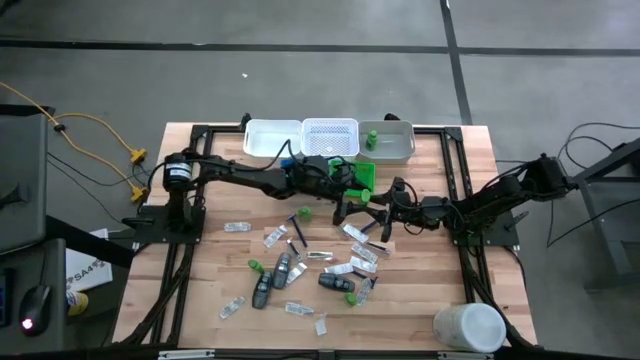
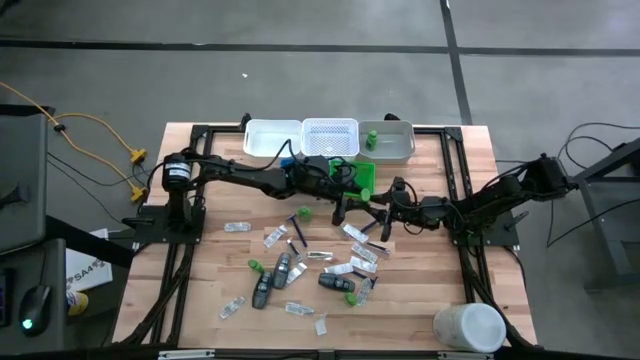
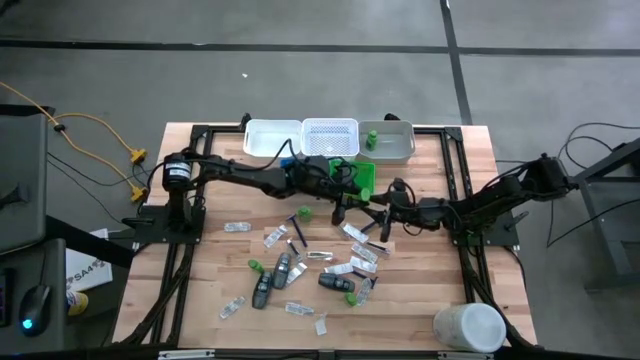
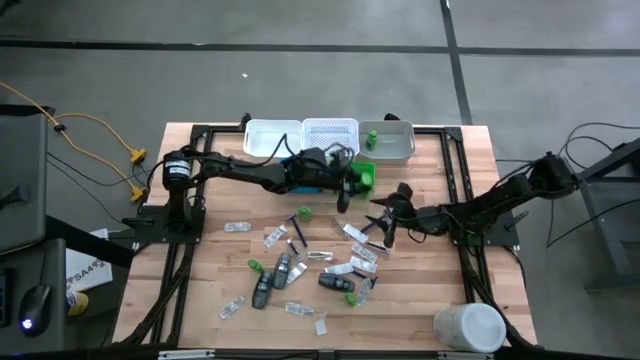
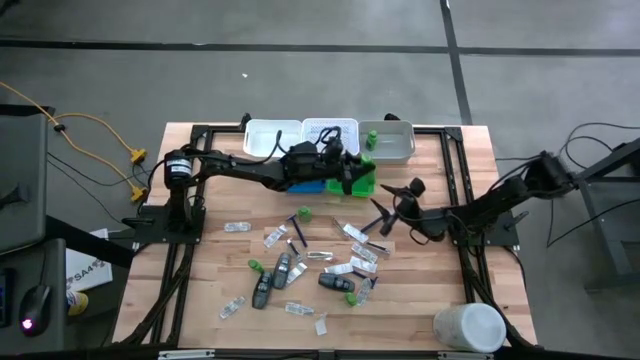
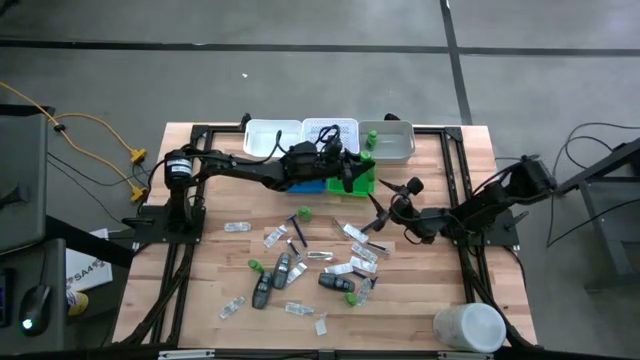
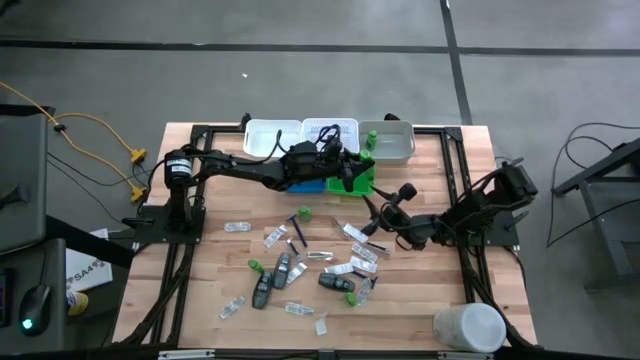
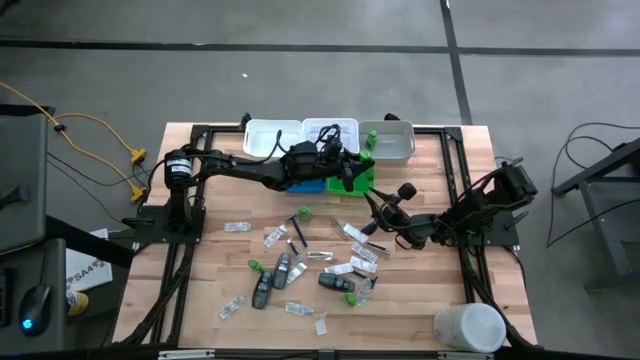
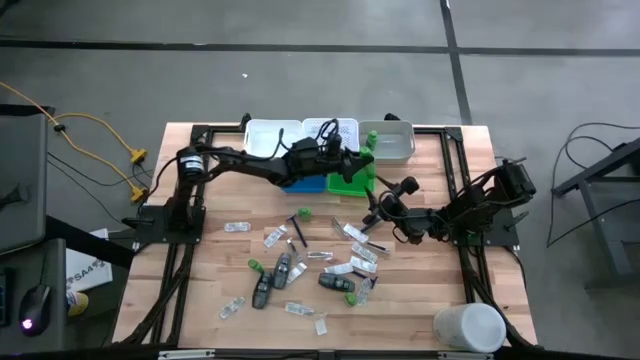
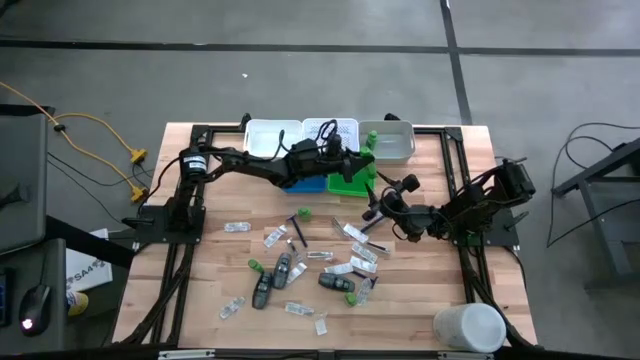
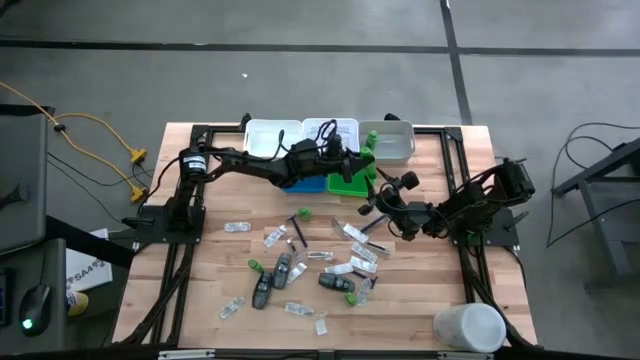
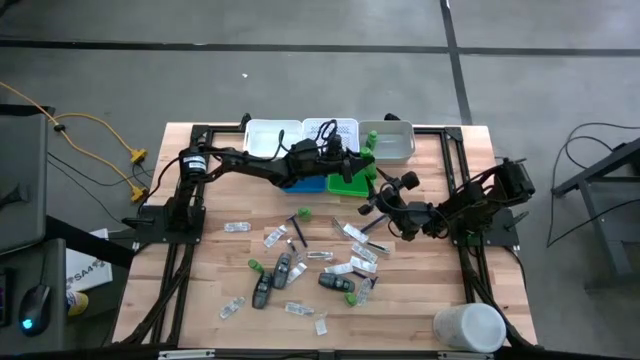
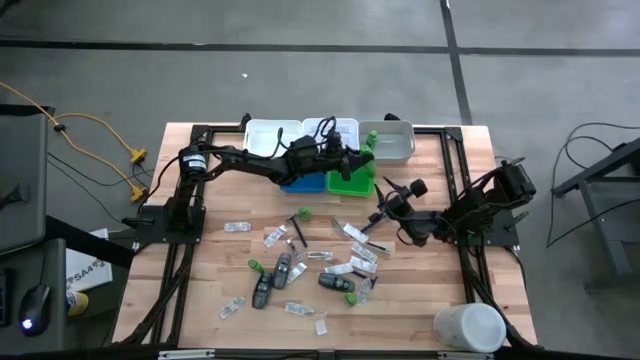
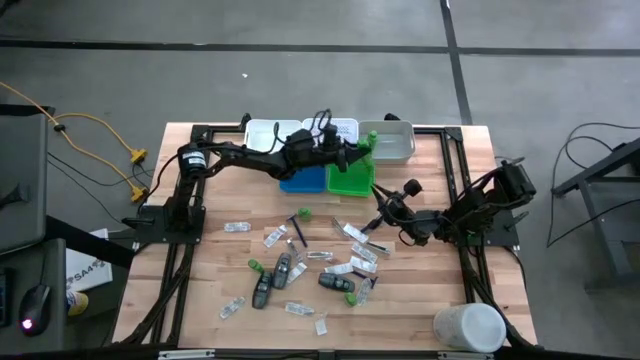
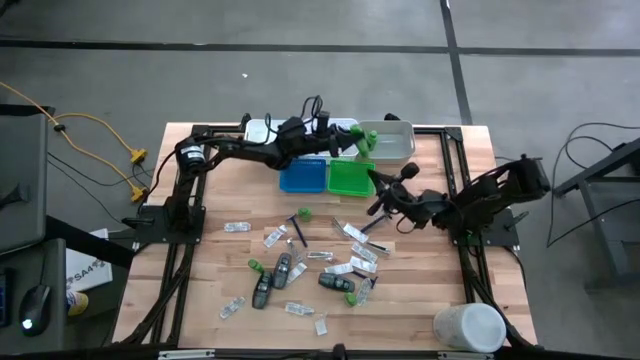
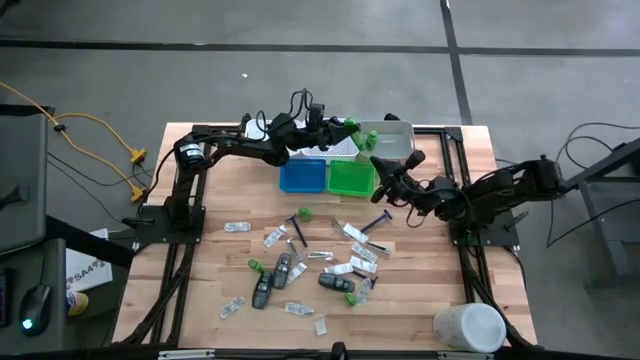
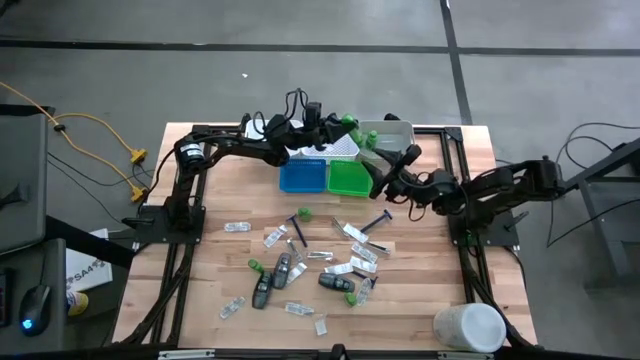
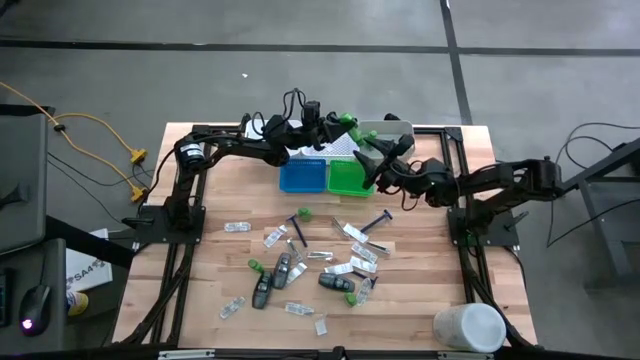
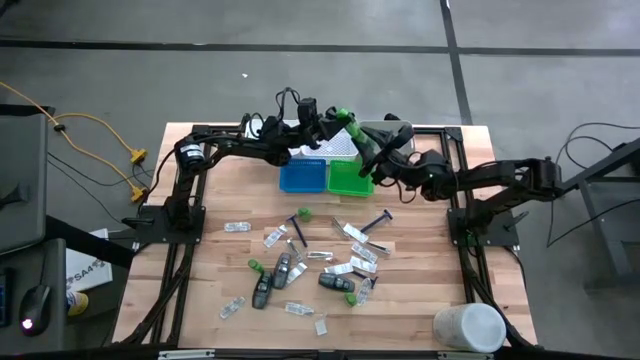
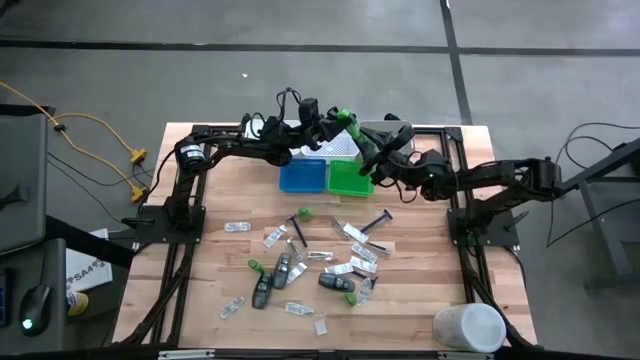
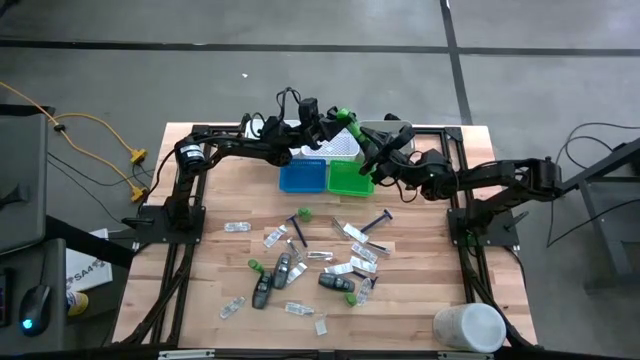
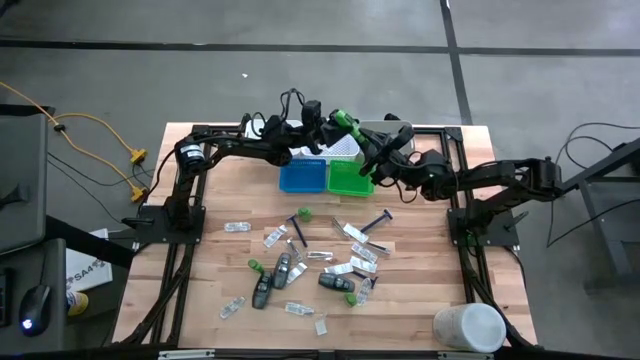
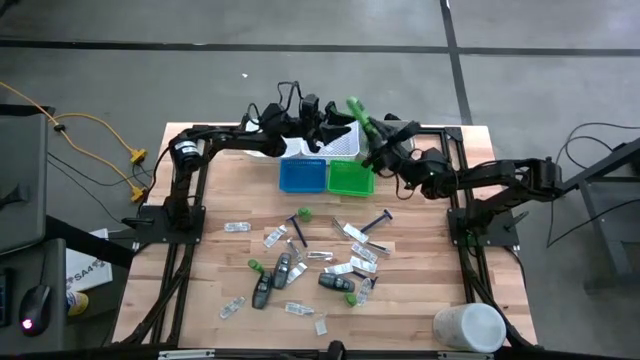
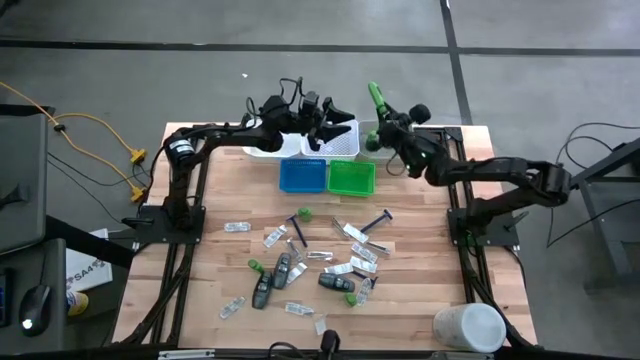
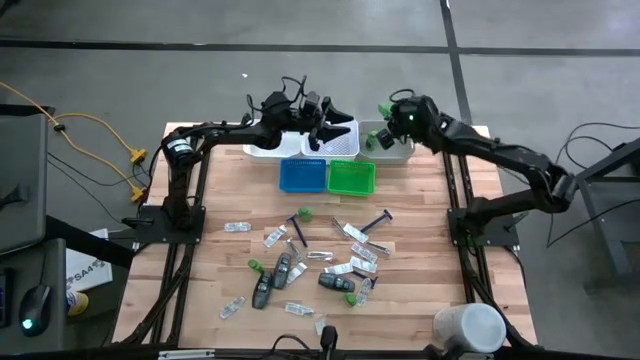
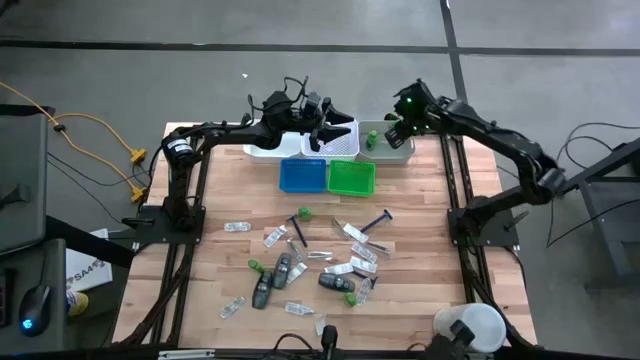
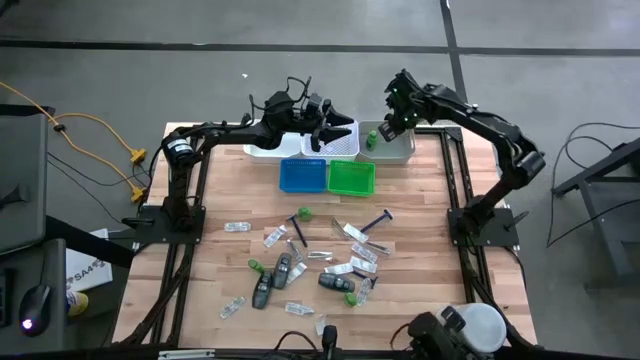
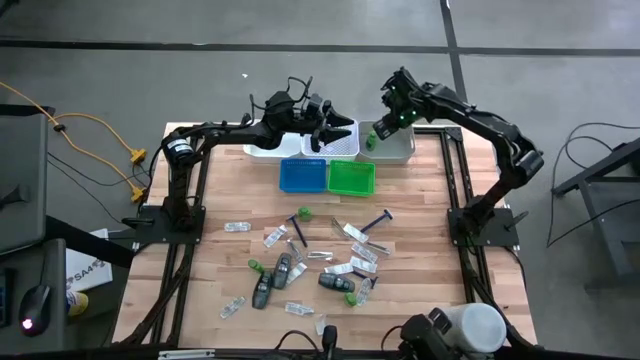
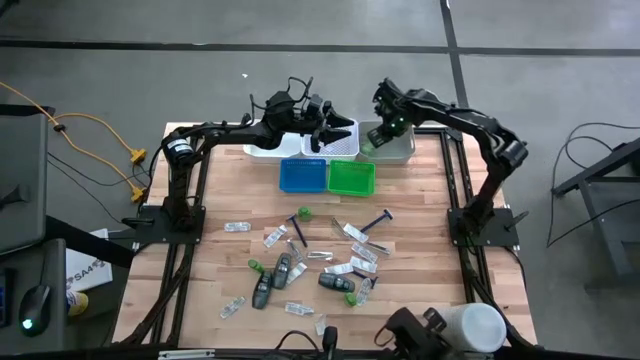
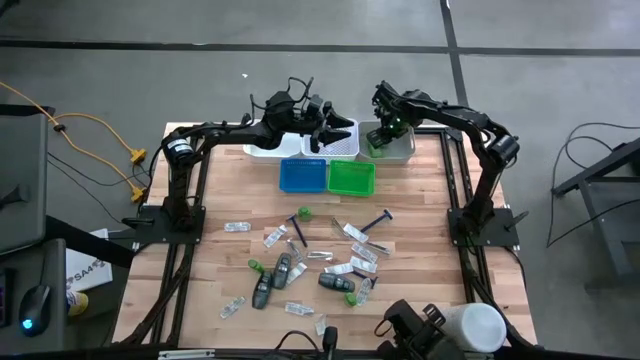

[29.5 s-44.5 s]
Task: Pick & Place Travel size toiletries
Put the green shampoo bottle into the gray bin

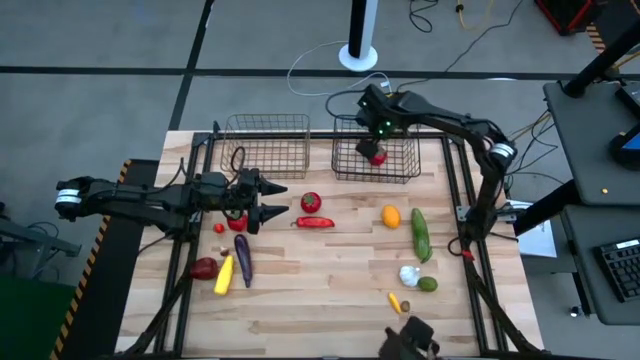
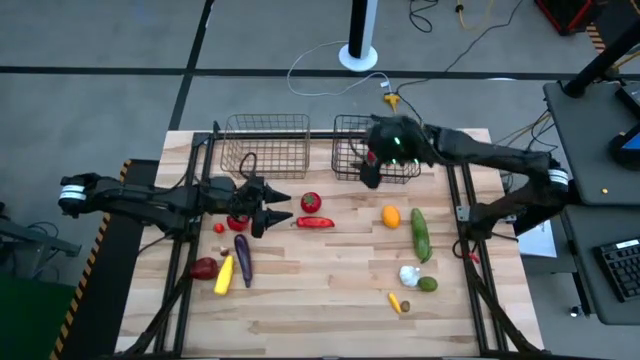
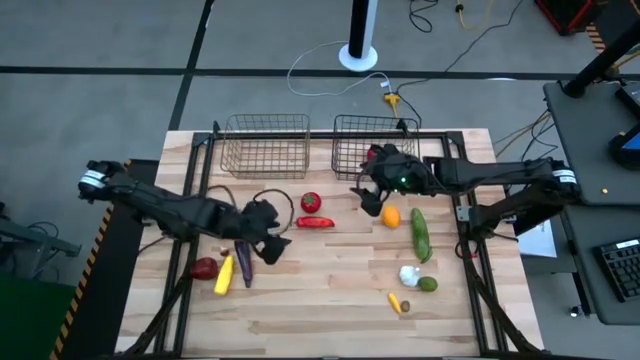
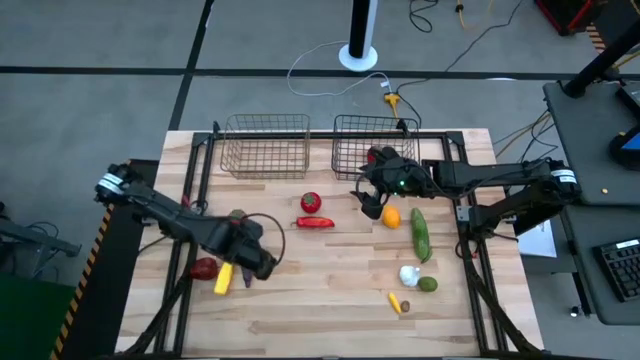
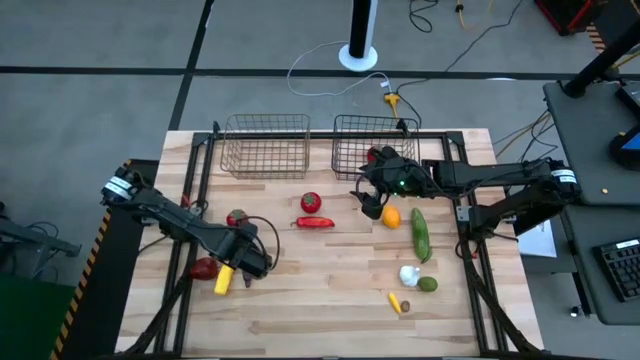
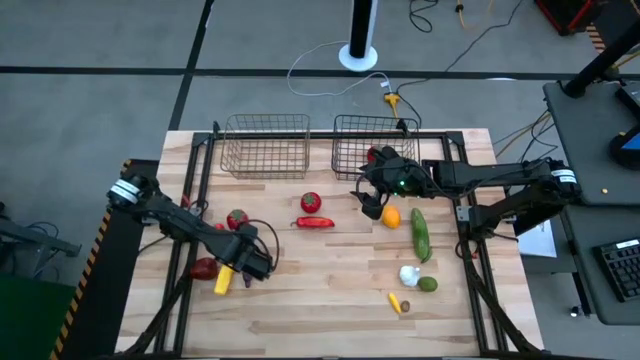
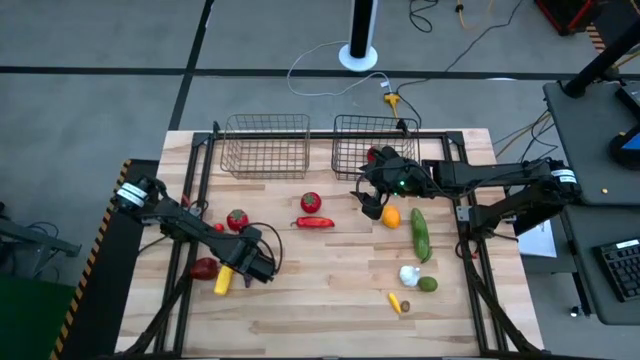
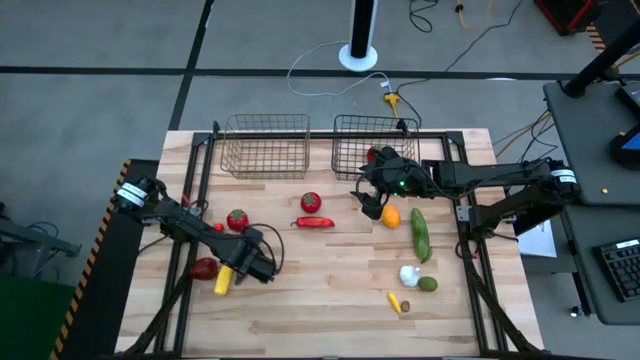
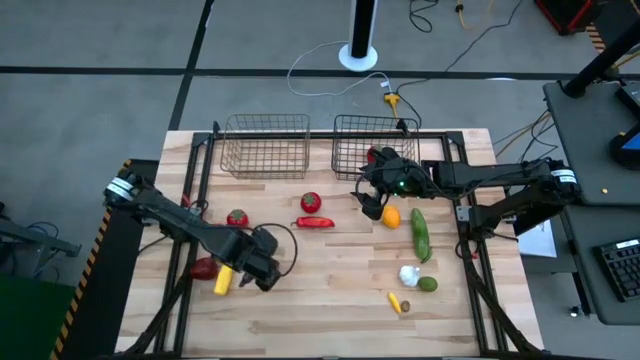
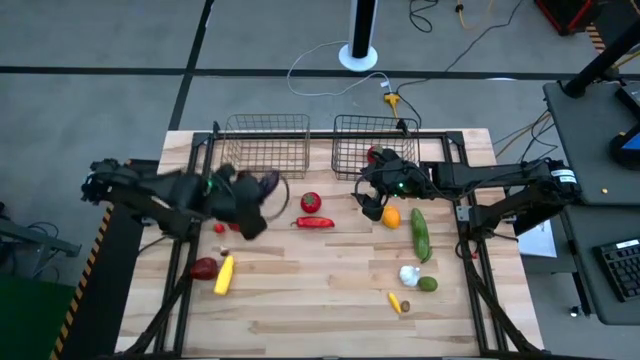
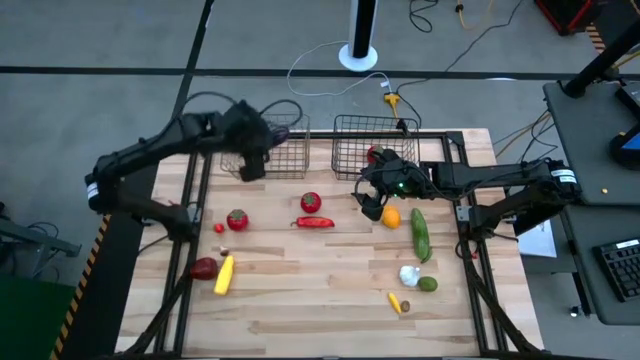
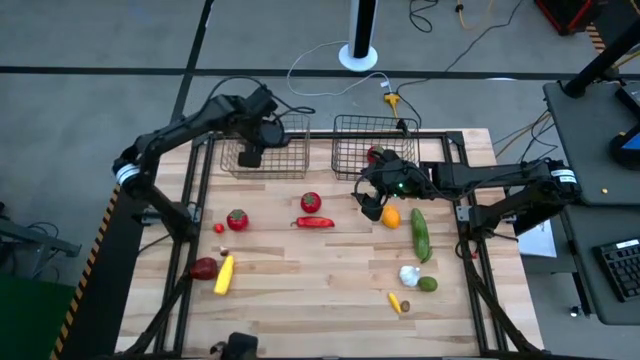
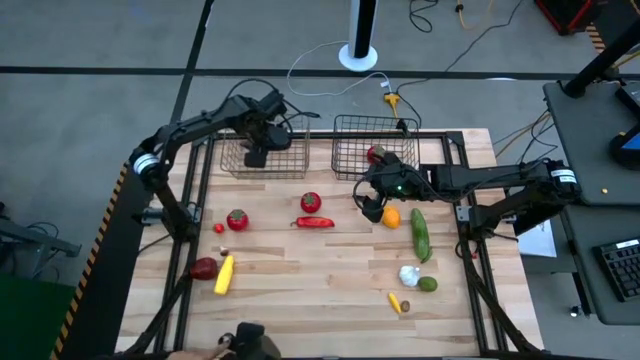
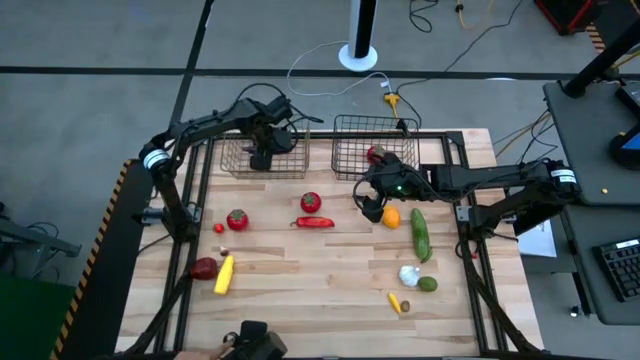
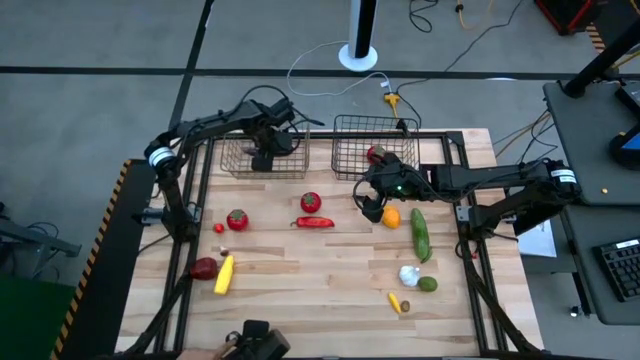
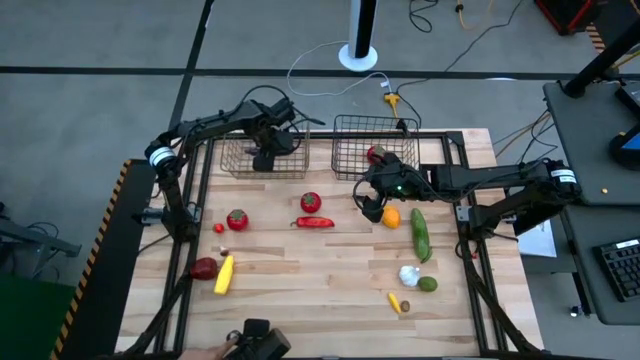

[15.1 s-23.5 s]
Task: Sort produce into baskets
Put the violet eggplant into the left wire basket
